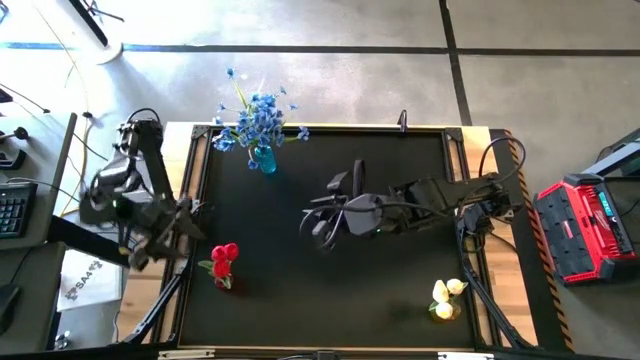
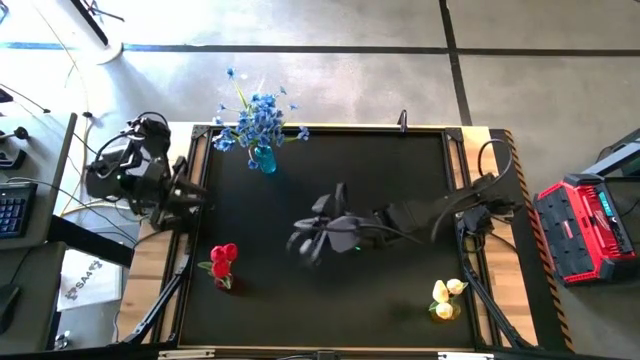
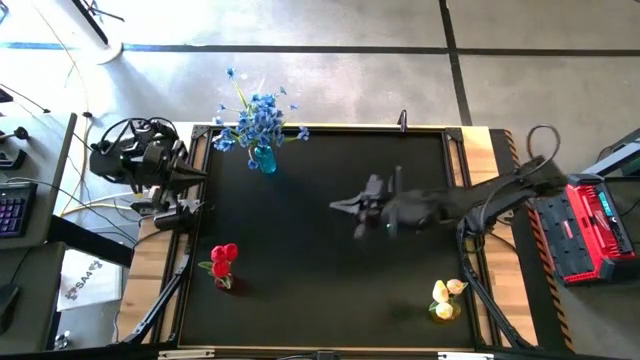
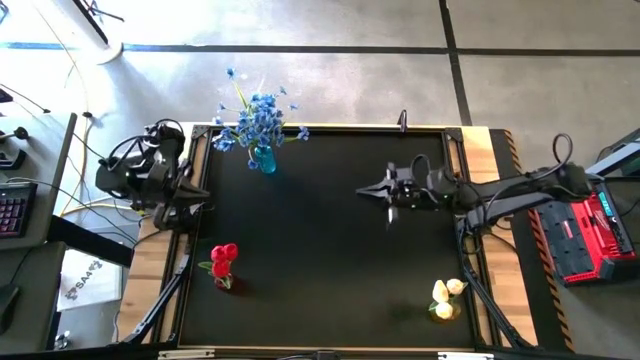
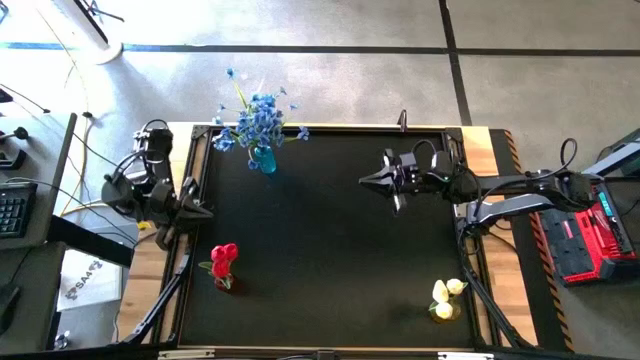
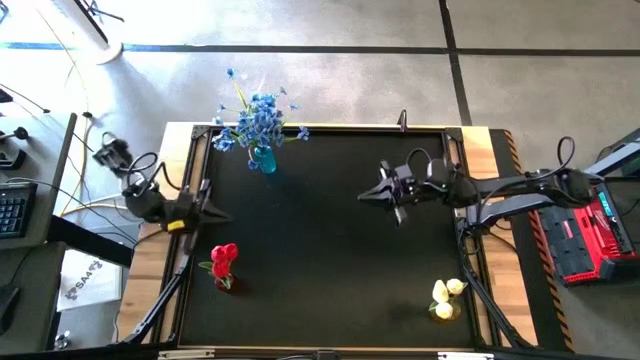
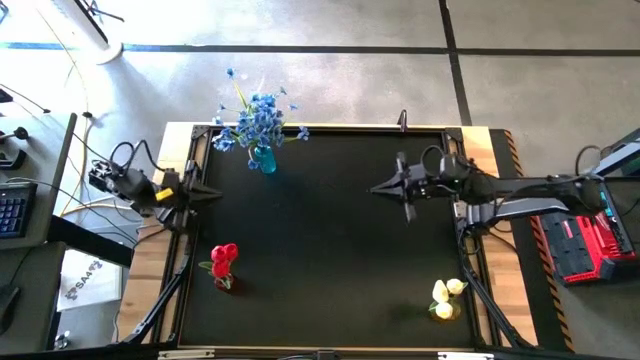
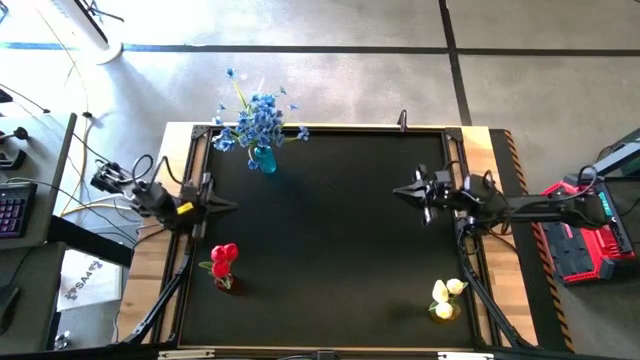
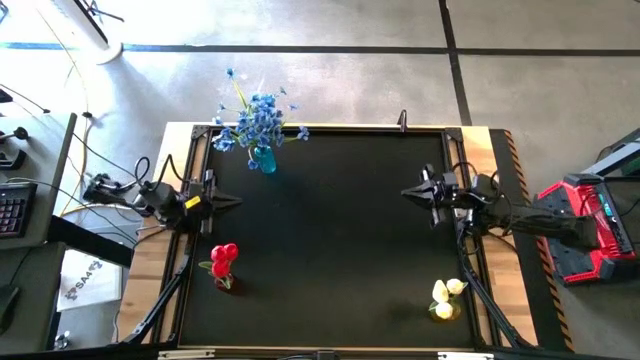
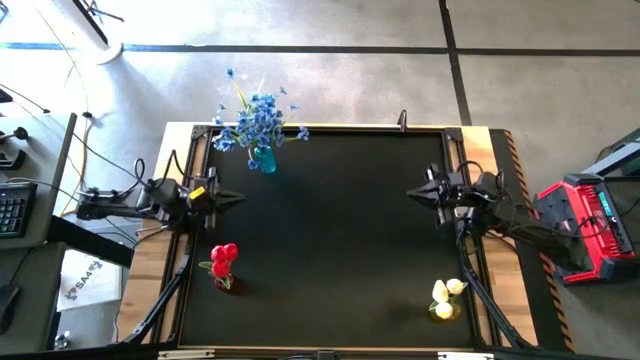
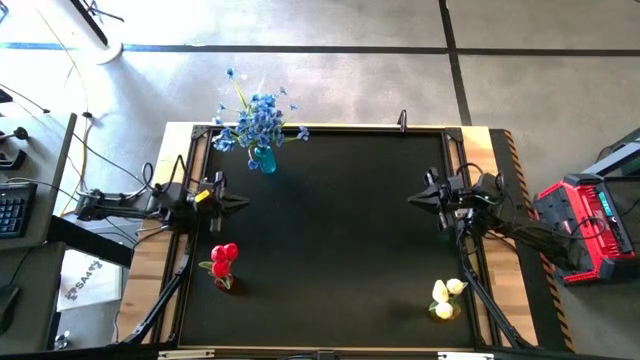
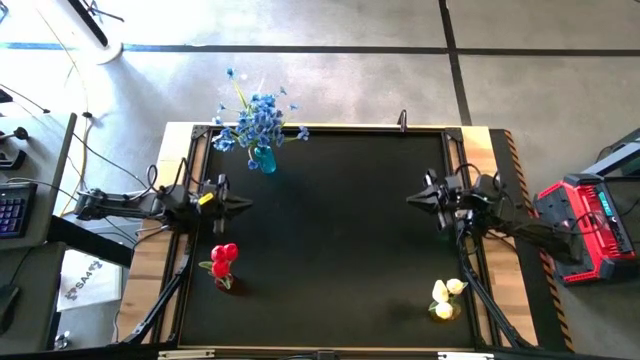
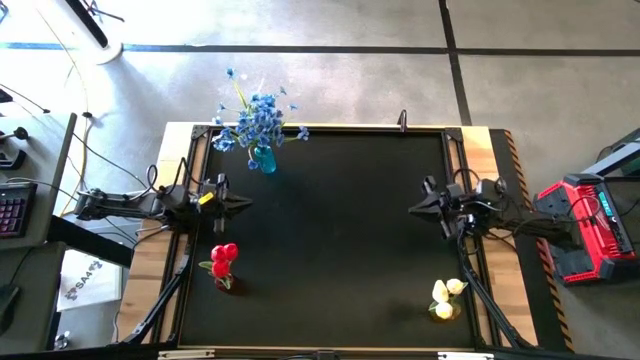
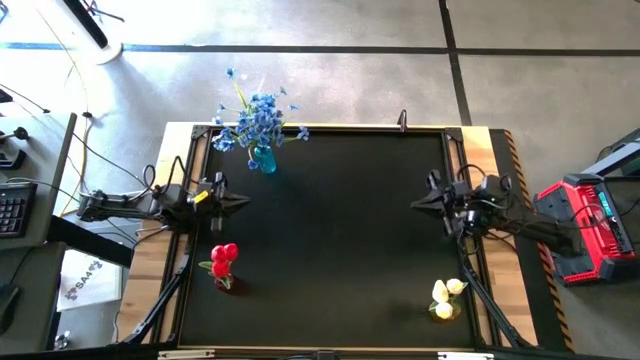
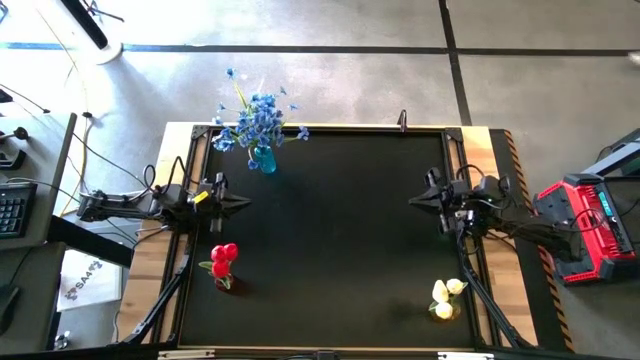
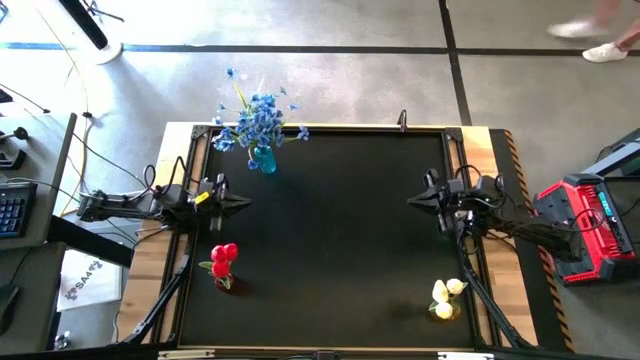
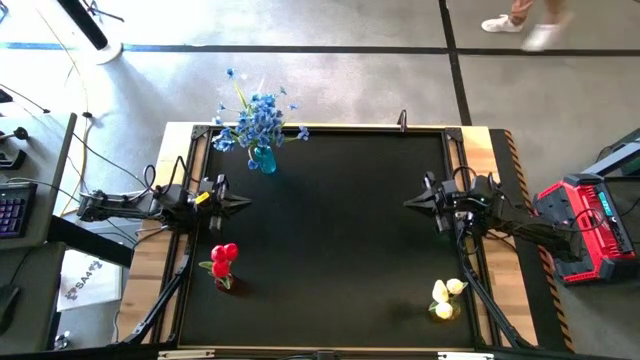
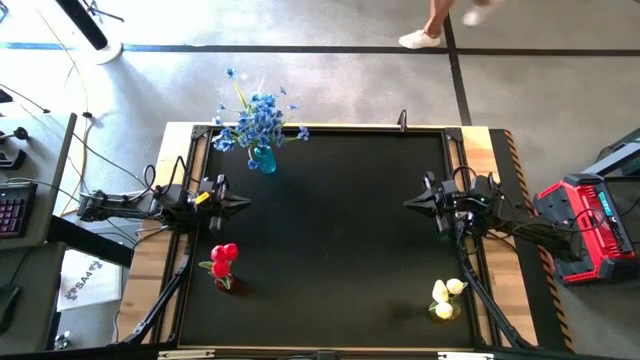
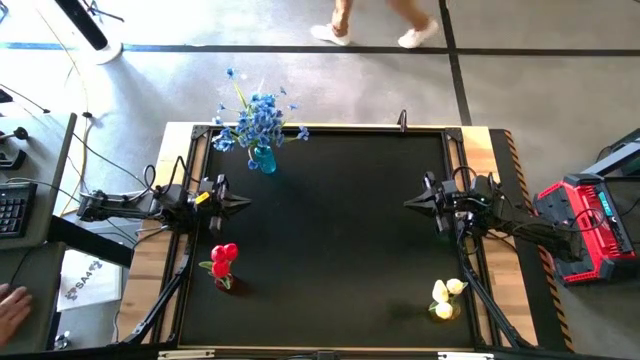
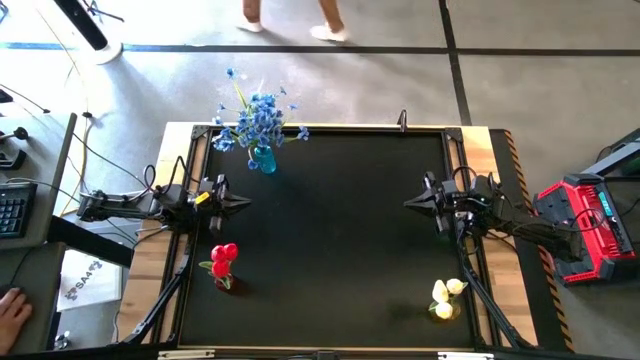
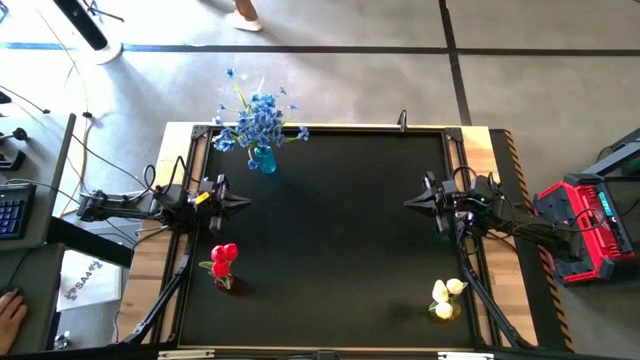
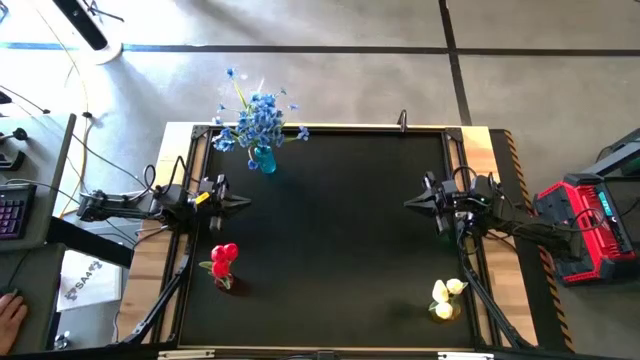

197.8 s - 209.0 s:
Task: Sort flowers into vase by color
Return to Home Position

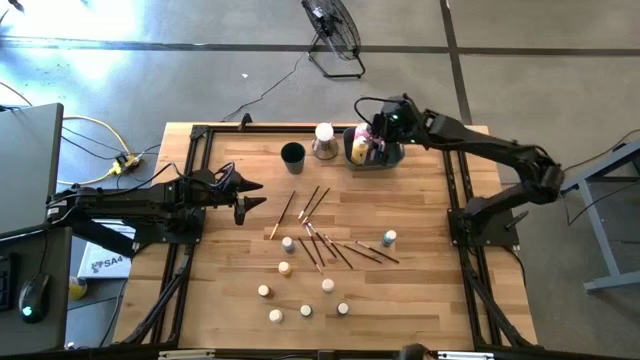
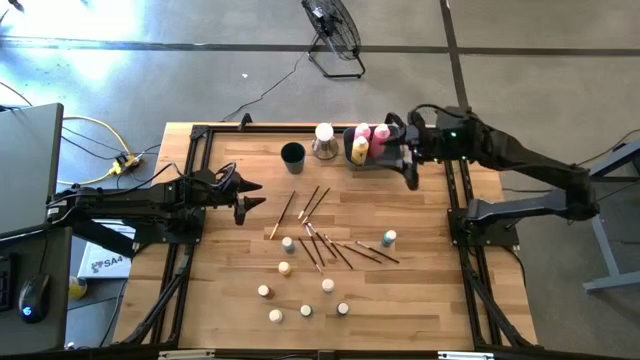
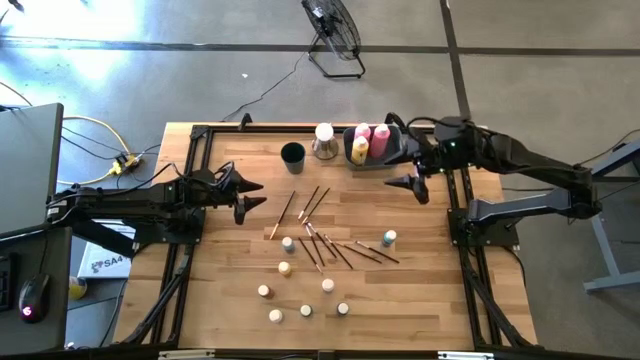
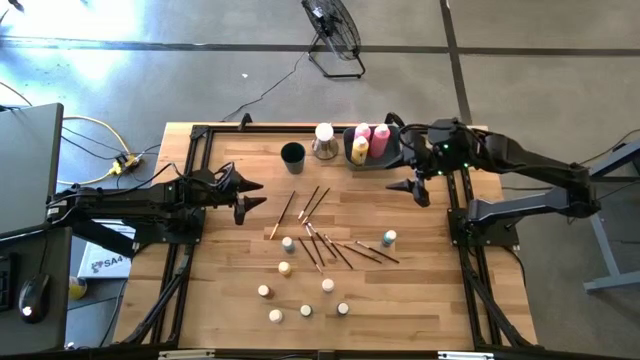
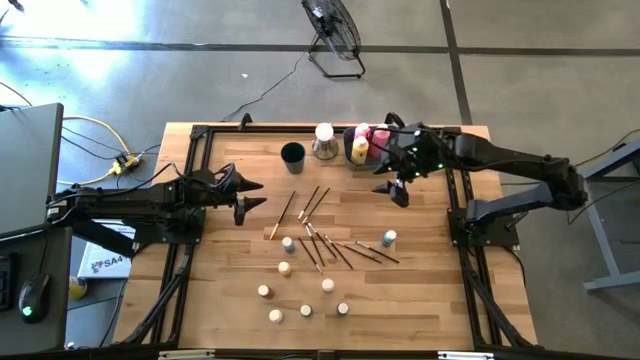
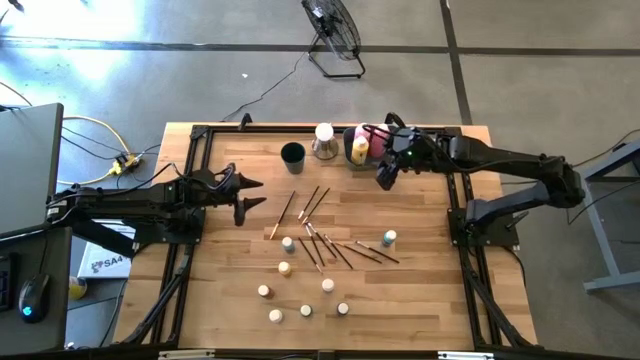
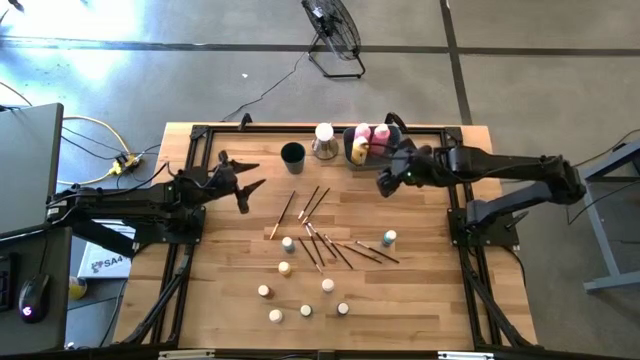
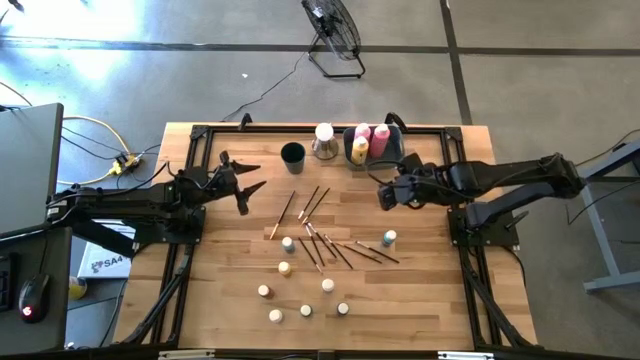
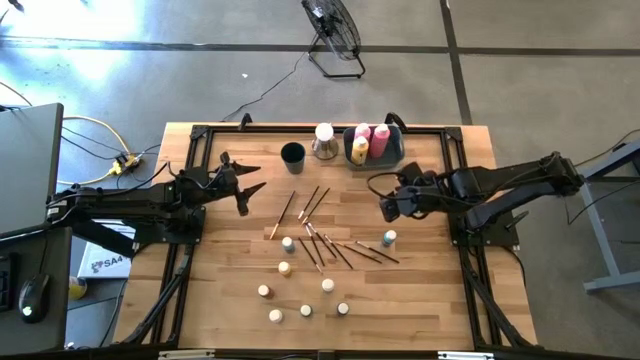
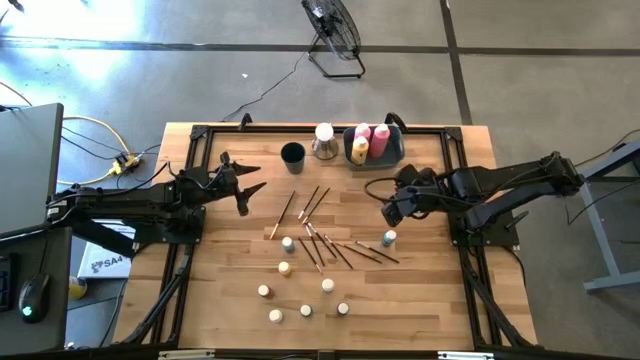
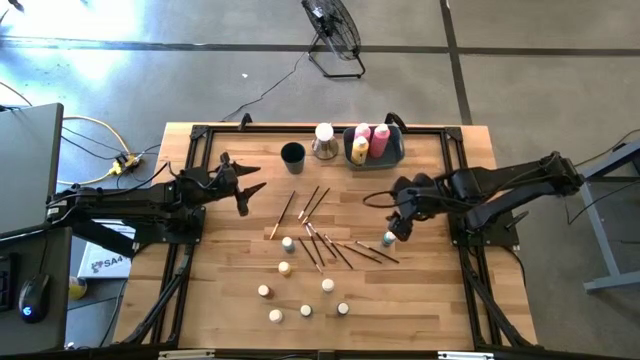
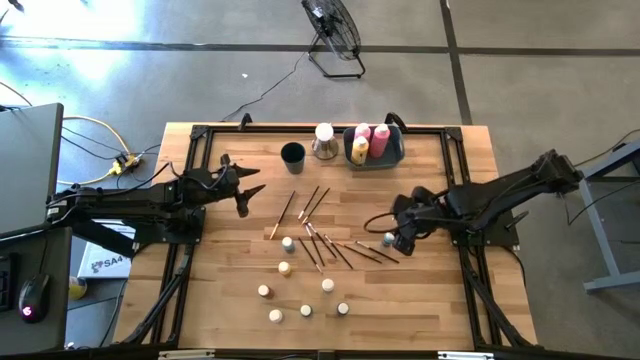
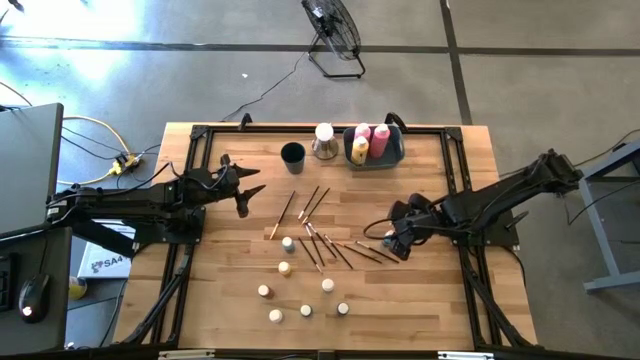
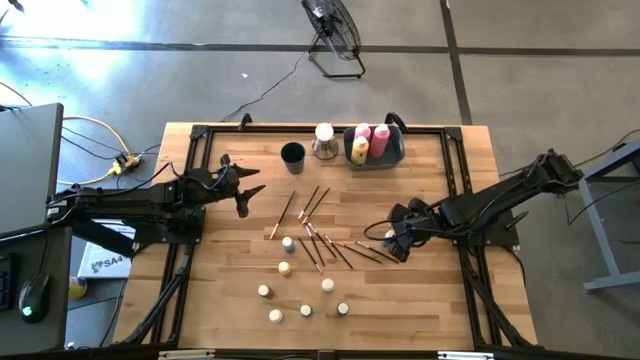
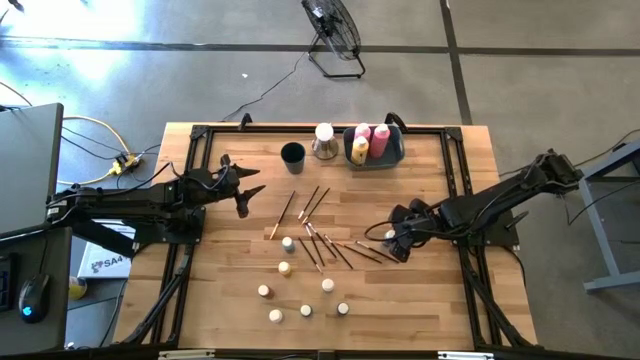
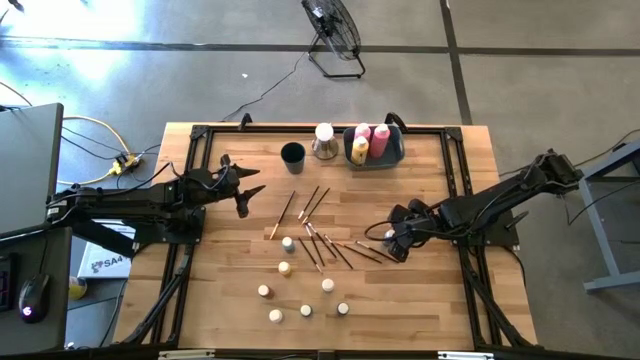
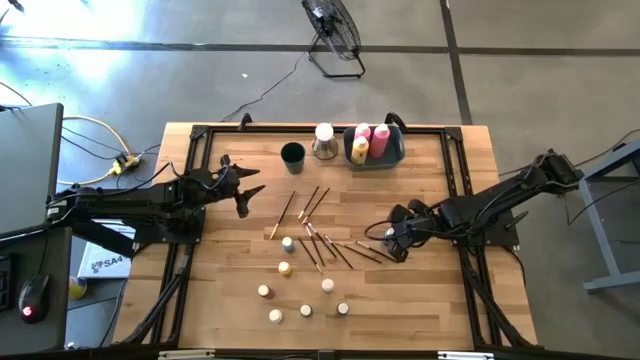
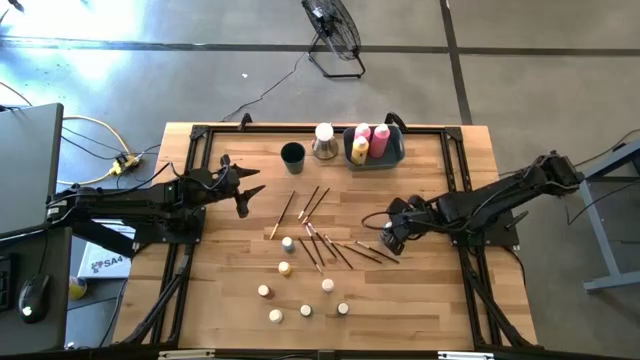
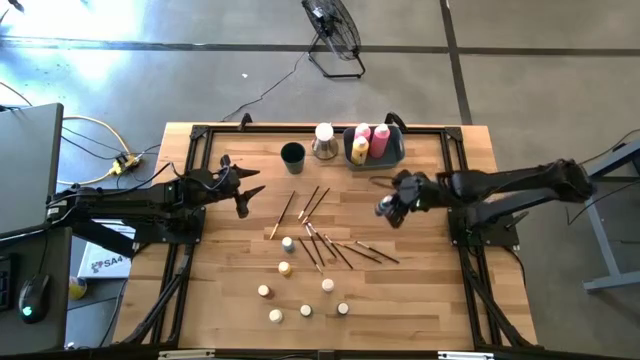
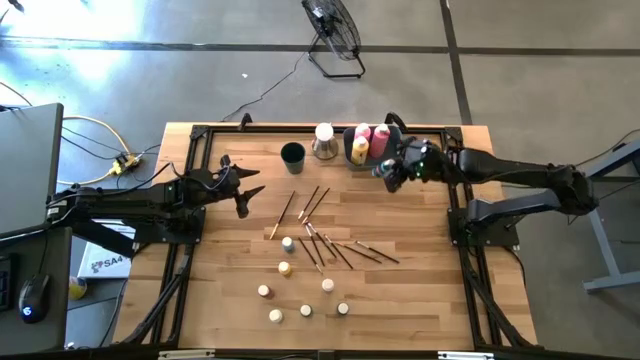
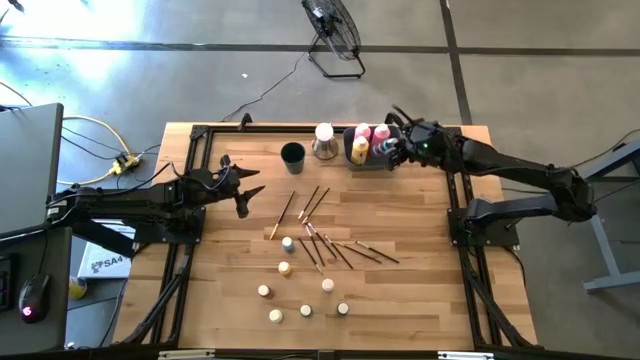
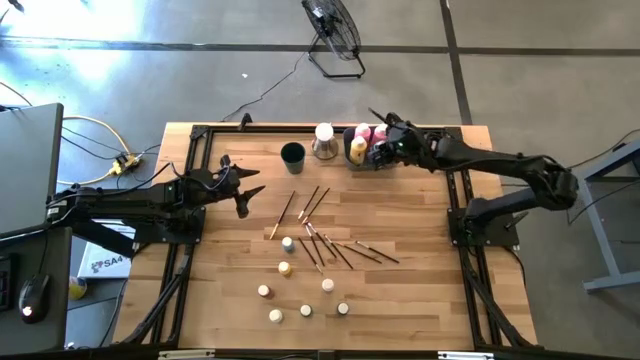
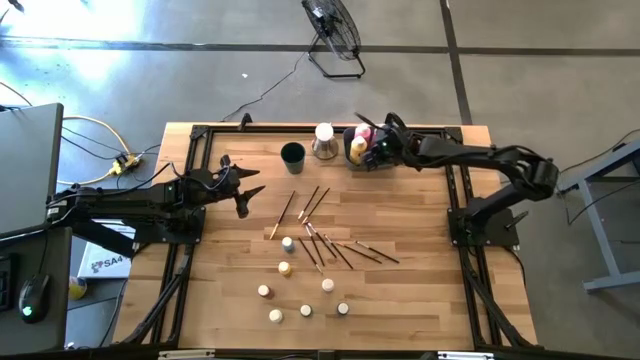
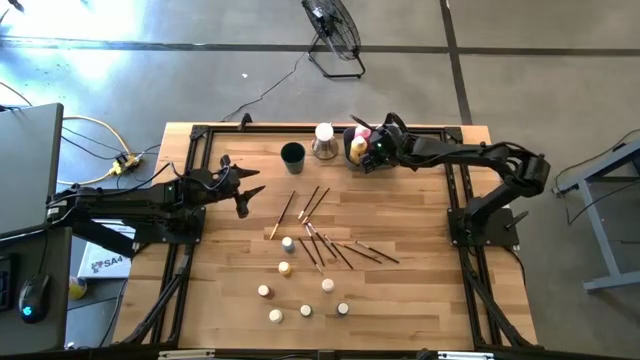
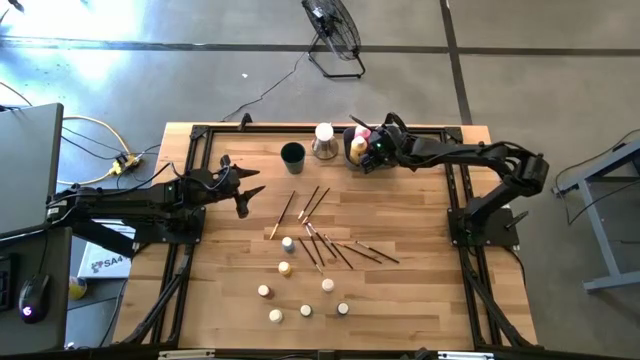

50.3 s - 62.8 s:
Task: Pick & Place Paint Supplies
Put the small blue paint bottle into the blue bin
